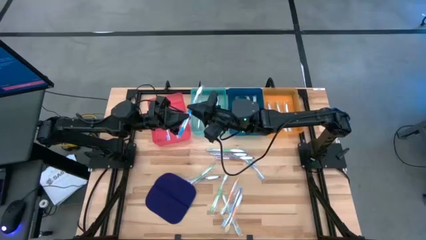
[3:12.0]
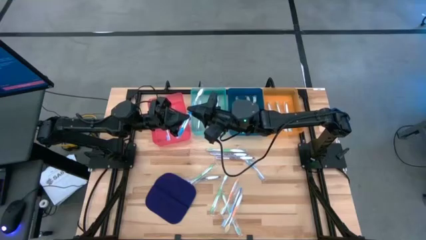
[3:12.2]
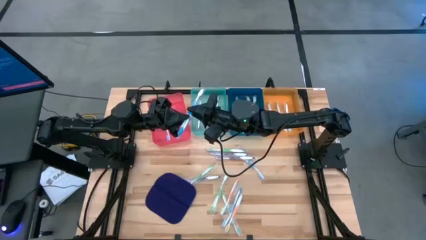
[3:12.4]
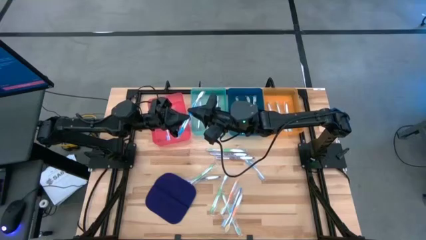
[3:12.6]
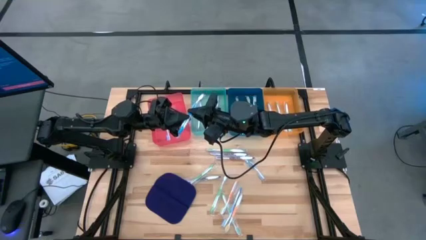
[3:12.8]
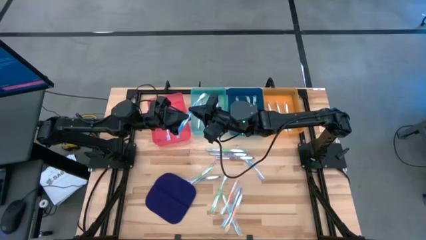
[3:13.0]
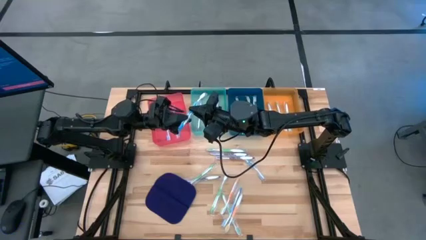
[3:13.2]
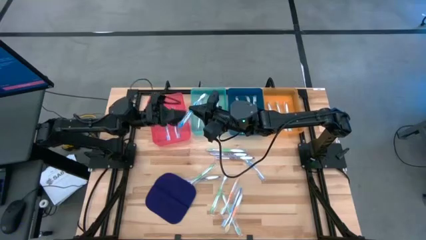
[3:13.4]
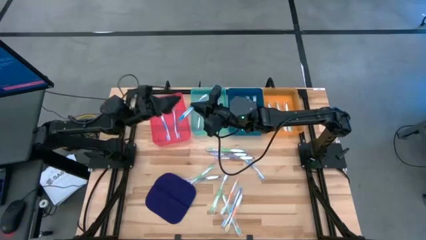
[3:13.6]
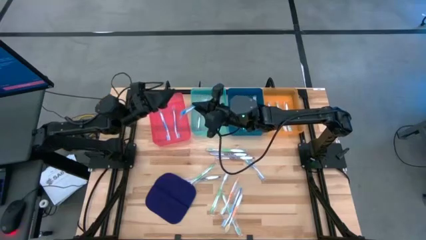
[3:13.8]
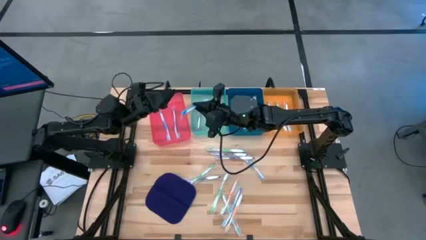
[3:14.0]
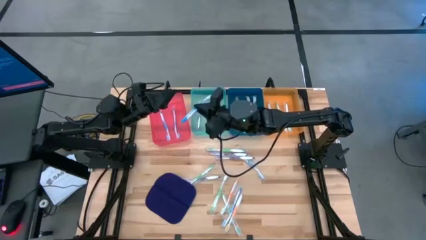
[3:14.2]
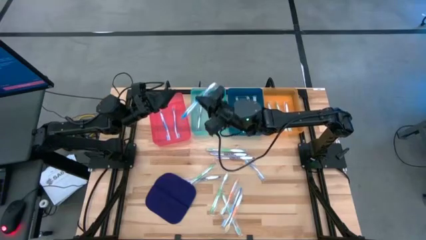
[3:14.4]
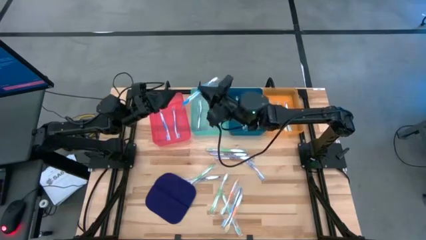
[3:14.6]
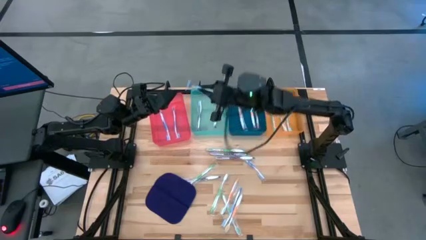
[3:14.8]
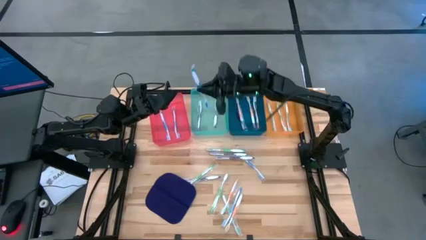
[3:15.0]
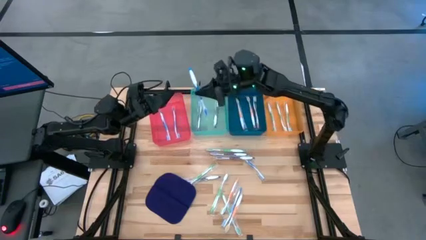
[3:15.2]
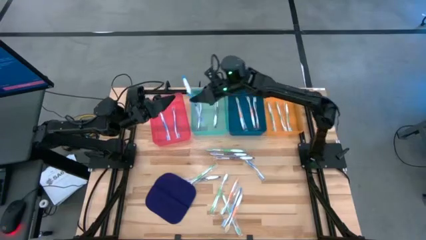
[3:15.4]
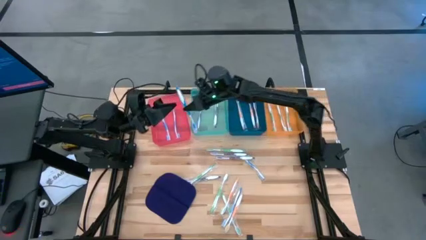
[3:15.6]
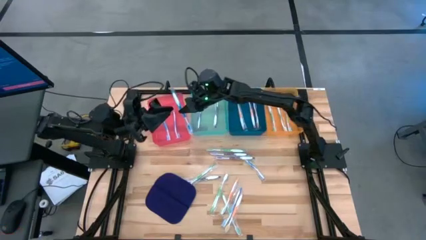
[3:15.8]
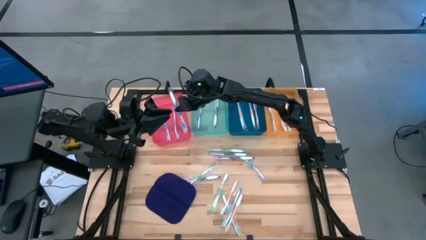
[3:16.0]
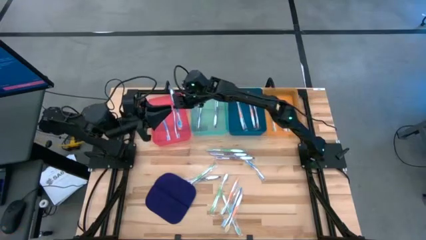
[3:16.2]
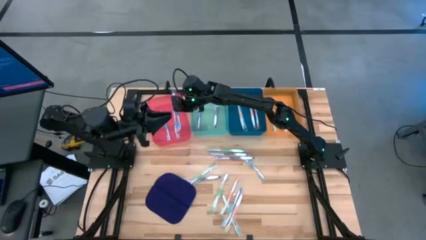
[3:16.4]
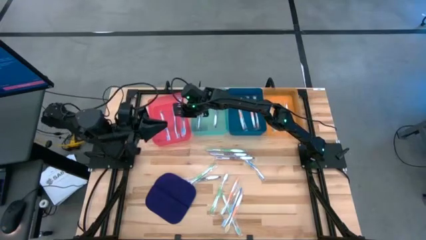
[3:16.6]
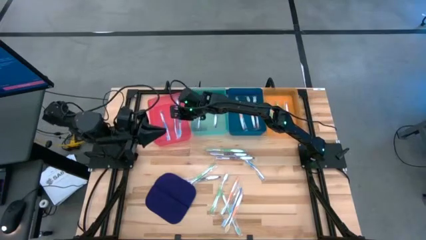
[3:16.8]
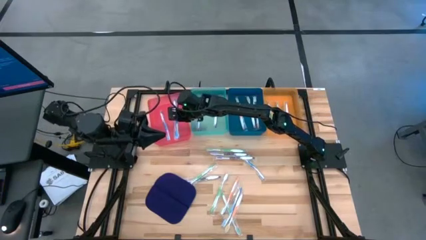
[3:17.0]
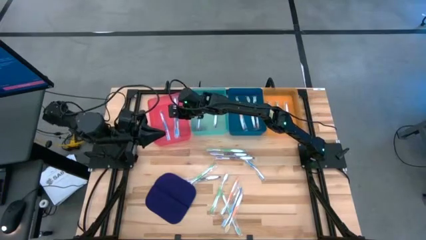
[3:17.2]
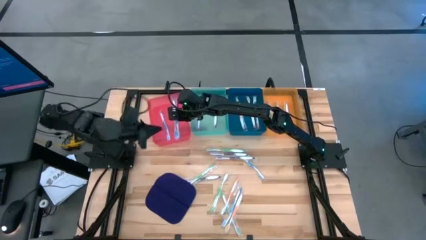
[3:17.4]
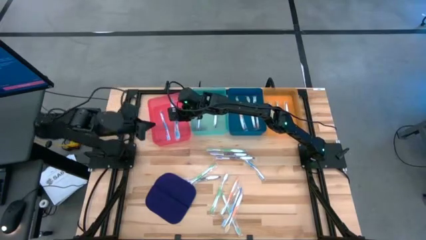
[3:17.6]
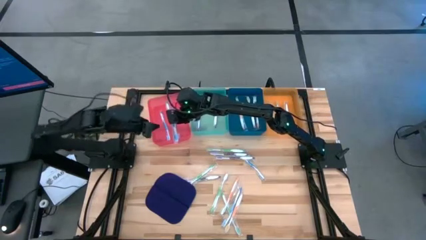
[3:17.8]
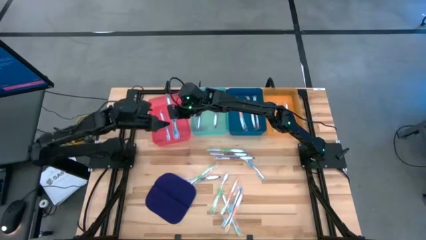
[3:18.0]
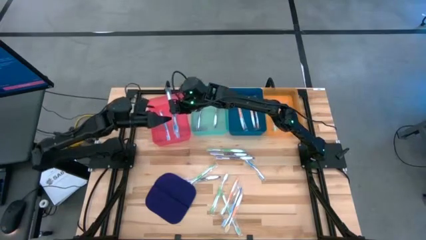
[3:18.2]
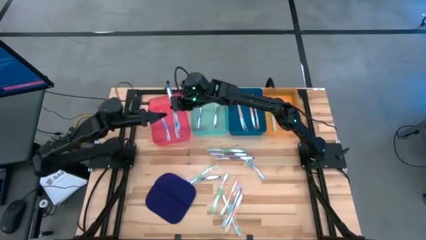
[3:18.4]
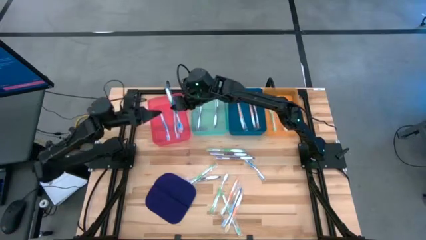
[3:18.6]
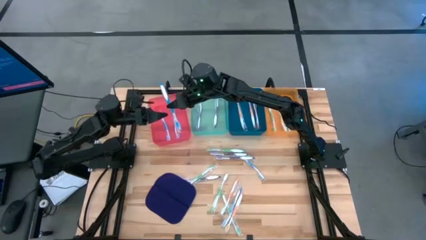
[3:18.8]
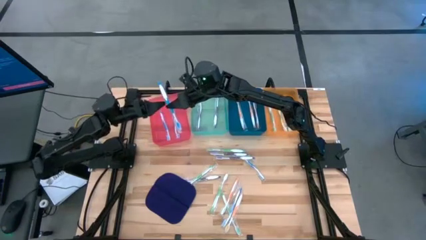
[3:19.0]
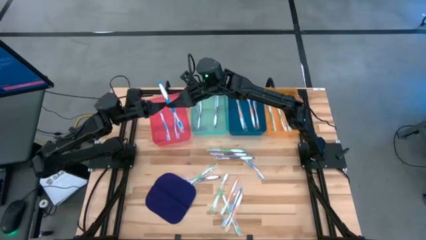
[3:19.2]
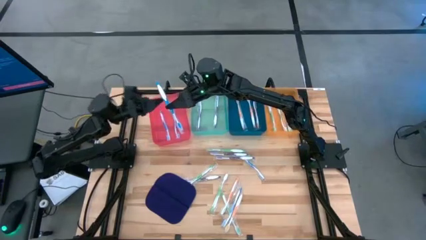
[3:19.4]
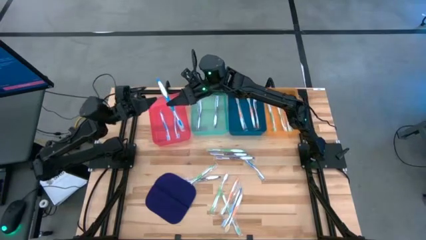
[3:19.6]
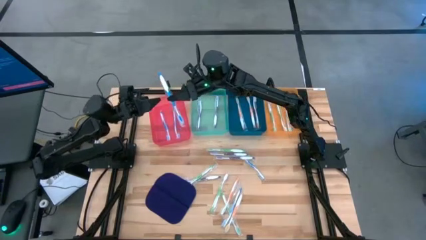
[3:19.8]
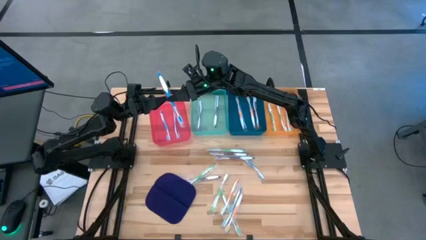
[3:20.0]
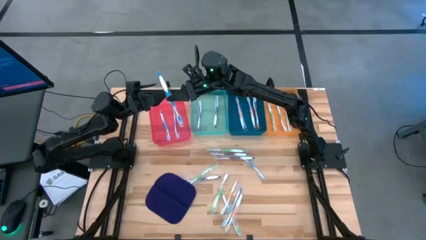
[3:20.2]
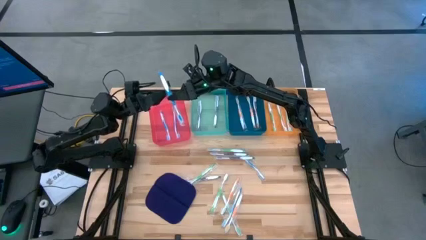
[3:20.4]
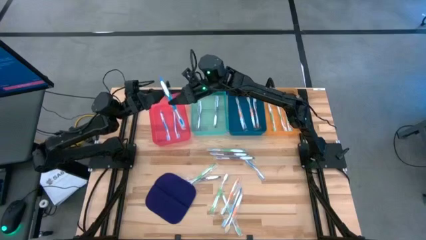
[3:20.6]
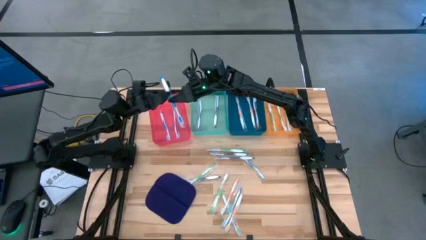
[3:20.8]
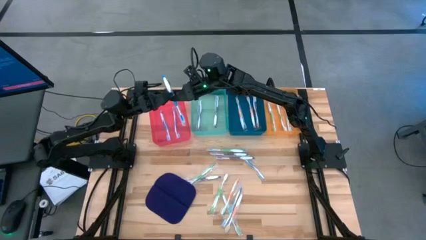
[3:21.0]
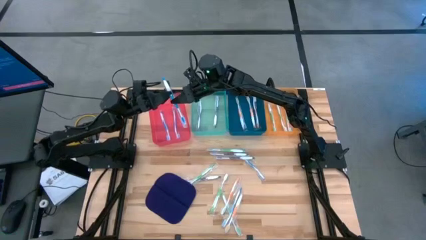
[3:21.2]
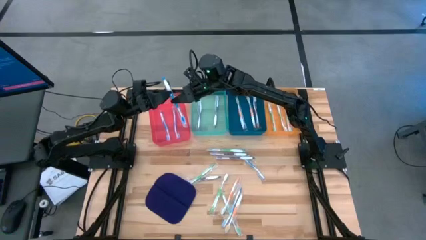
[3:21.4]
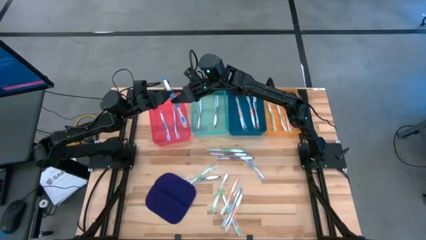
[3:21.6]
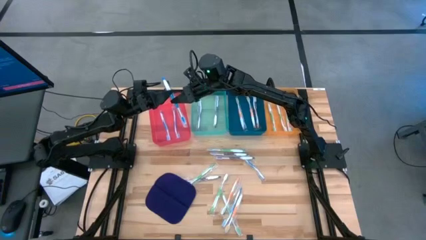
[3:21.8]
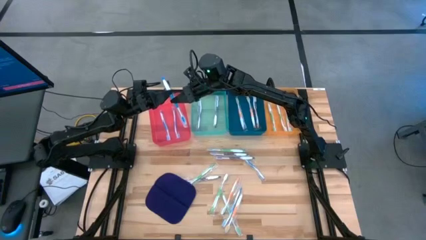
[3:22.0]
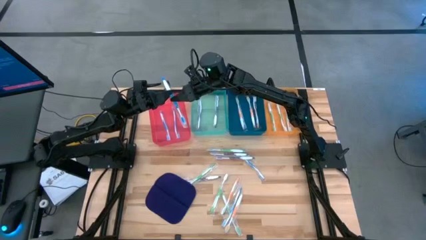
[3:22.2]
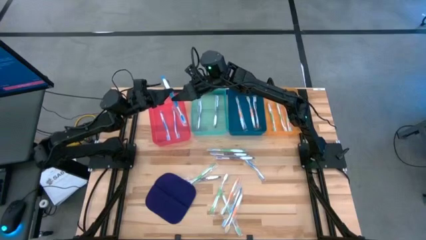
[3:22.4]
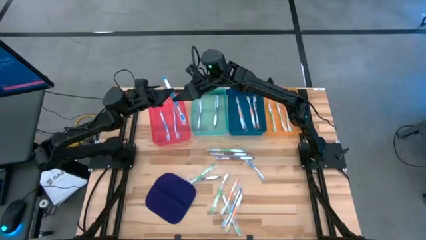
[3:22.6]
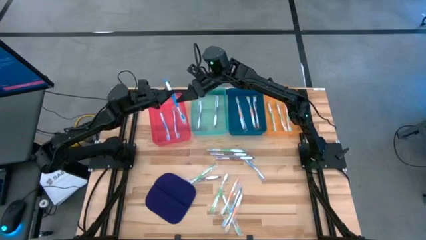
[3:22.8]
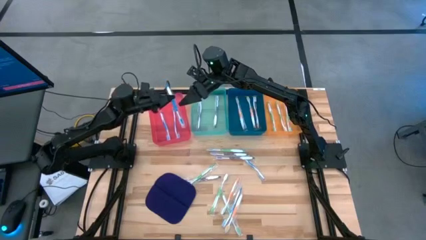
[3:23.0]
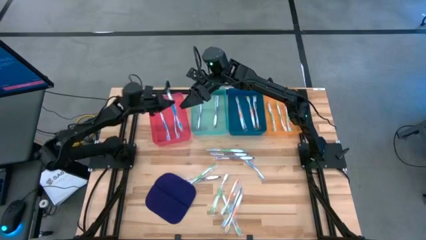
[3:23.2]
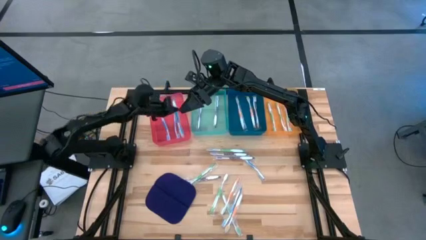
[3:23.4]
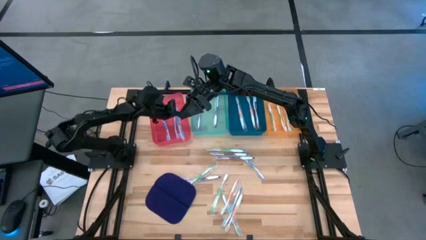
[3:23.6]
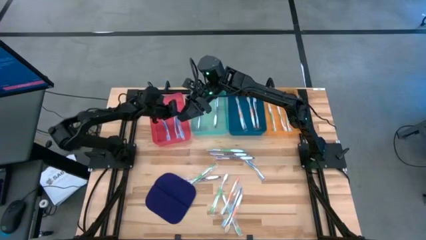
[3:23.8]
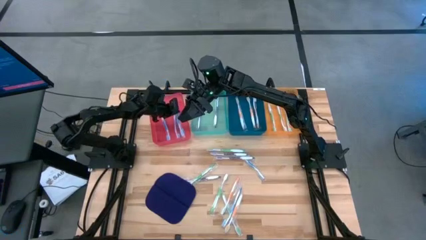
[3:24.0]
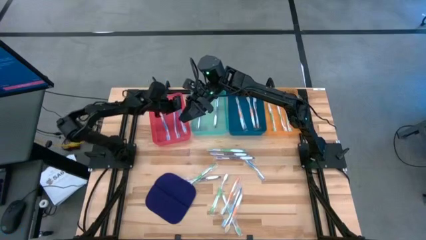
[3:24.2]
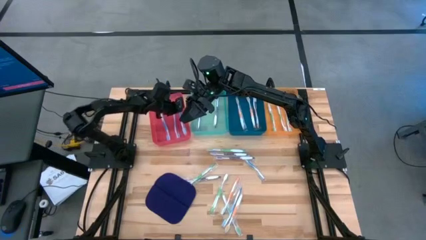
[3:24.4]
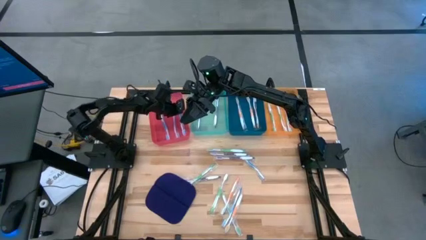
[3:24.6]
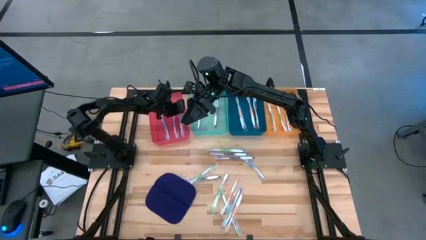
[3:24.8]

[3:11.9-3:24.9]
Task: Pick & Place Toothbrushes
Put the blue toothbrush into the red bin

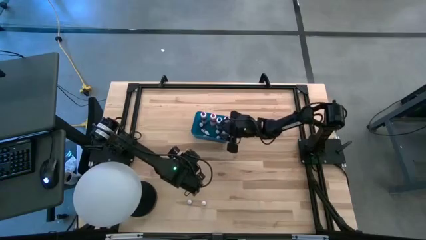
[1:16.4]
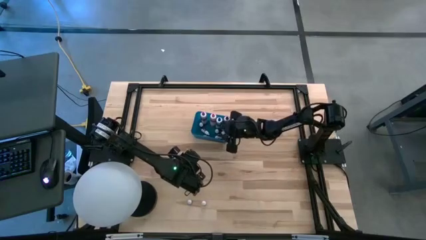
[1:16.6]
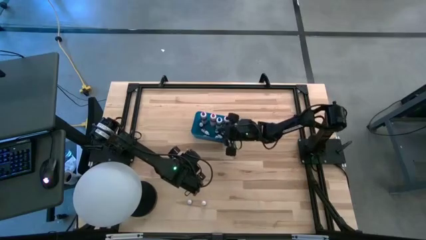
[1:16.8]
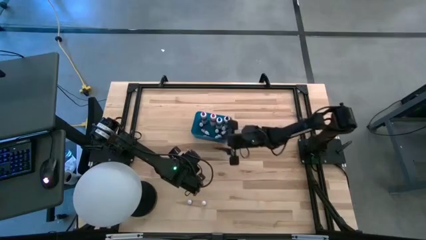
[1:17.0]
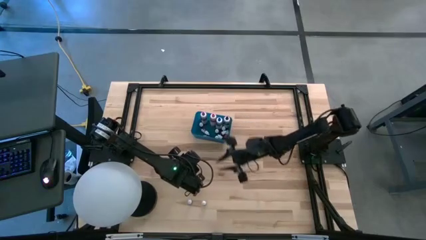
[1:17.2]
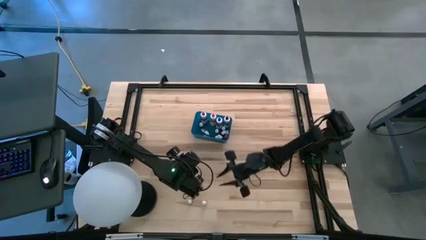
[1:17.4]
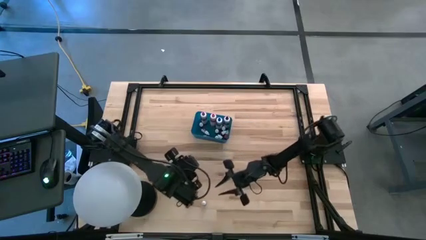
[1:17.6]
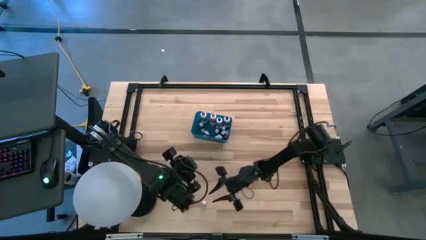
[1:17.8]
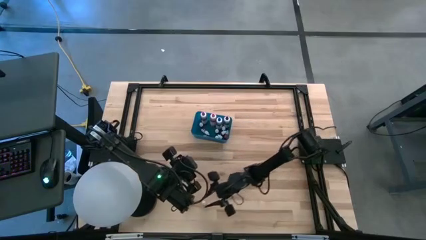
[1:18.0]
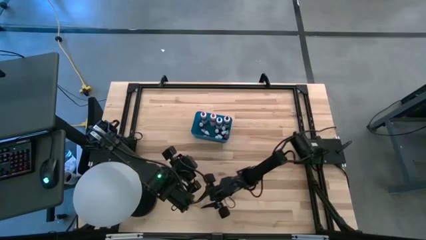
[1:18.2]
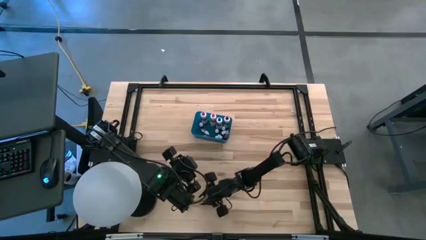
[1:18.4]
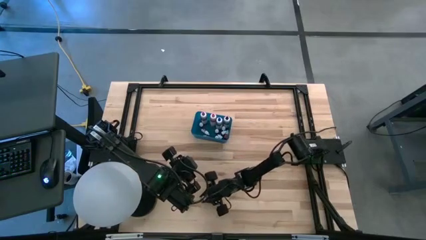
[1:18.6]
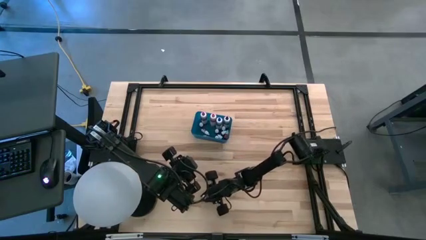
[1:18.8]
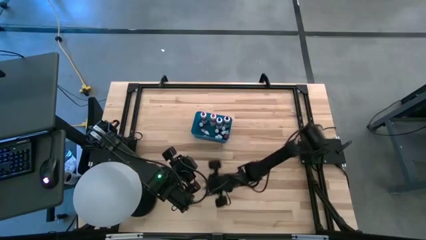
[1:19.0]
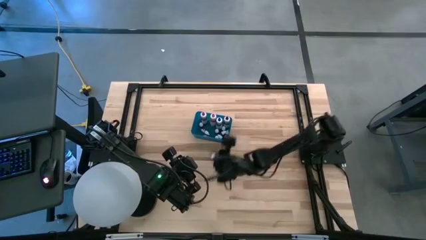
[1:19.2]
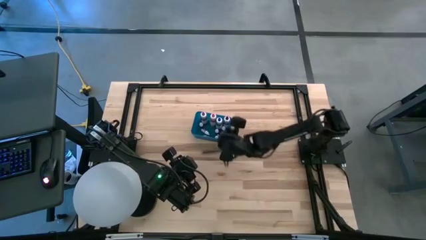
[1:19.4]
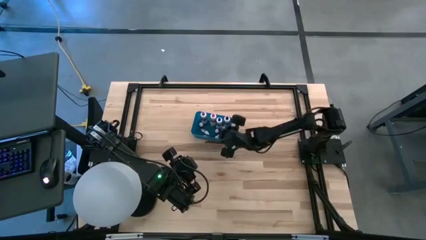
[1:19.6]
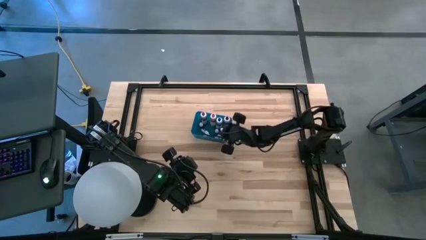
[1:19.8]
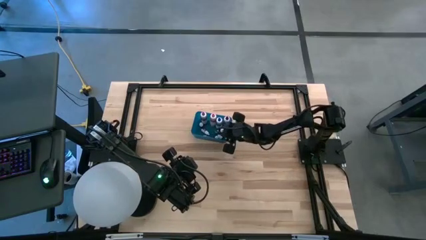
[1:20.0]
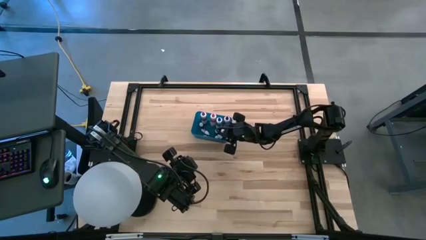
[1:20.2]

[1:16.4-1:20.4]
Task: Pick & Place food coloring
Put the orange food coloring bottle into the blue bin
